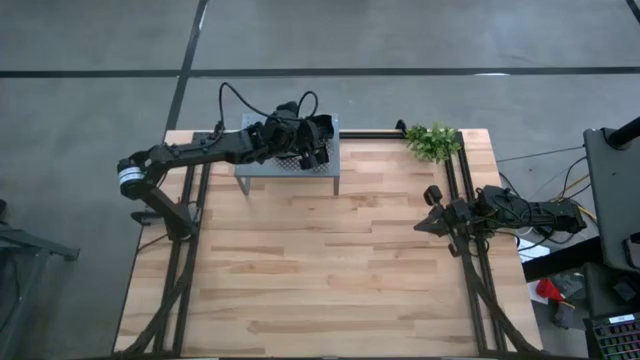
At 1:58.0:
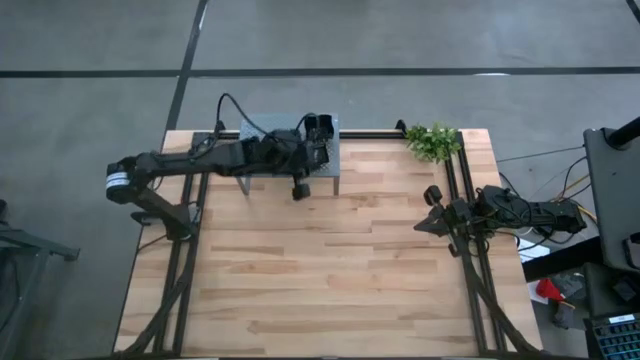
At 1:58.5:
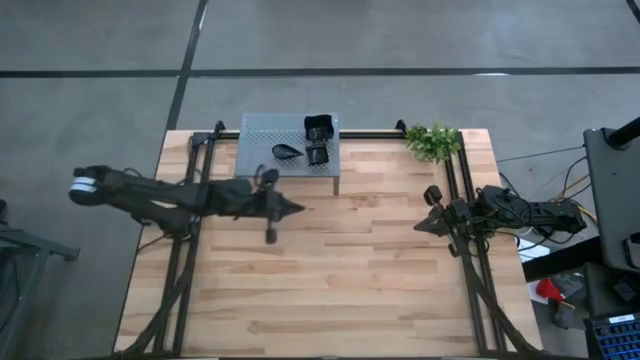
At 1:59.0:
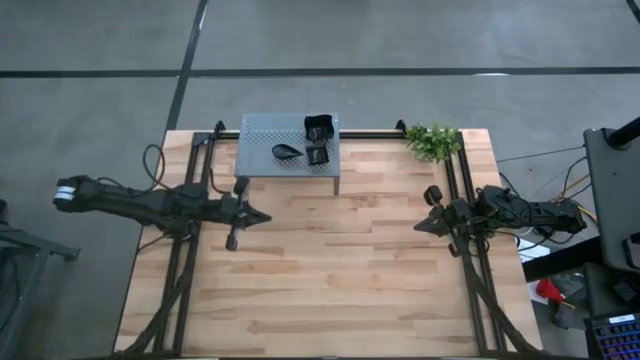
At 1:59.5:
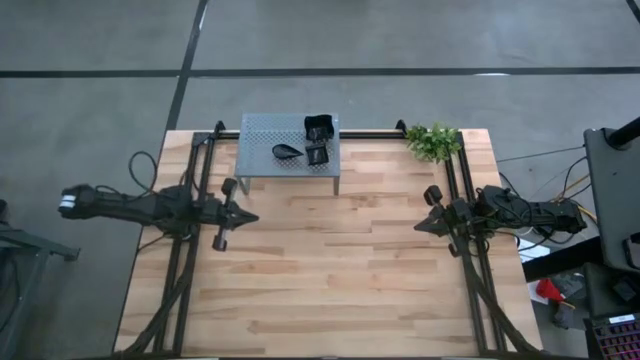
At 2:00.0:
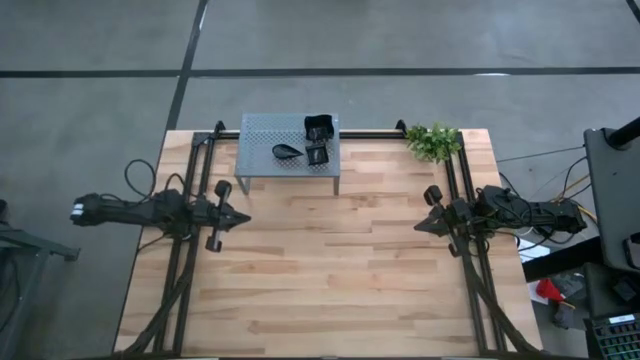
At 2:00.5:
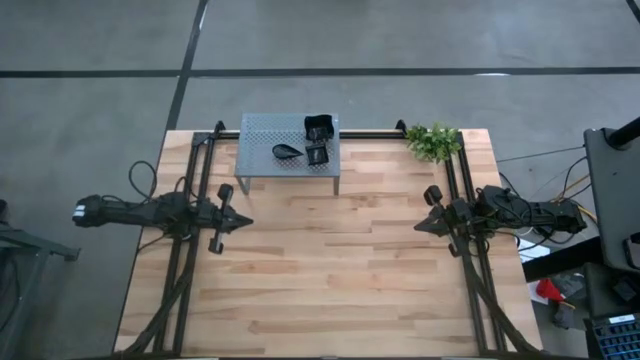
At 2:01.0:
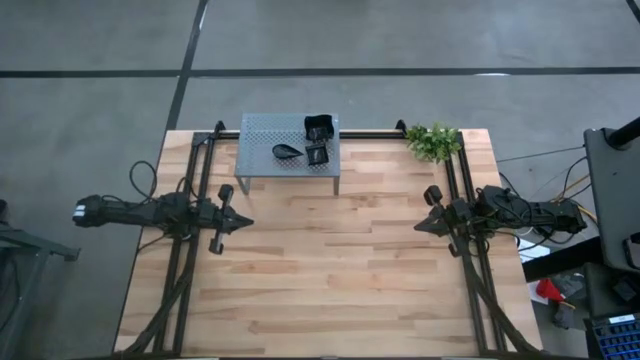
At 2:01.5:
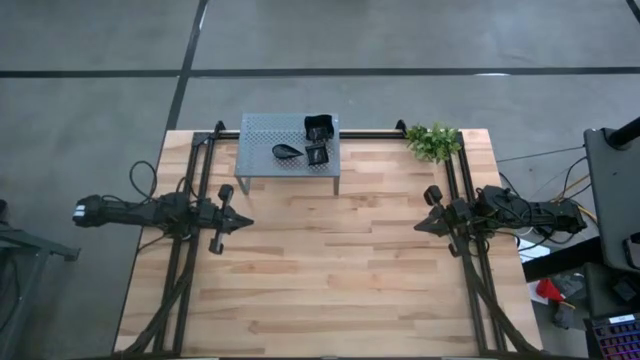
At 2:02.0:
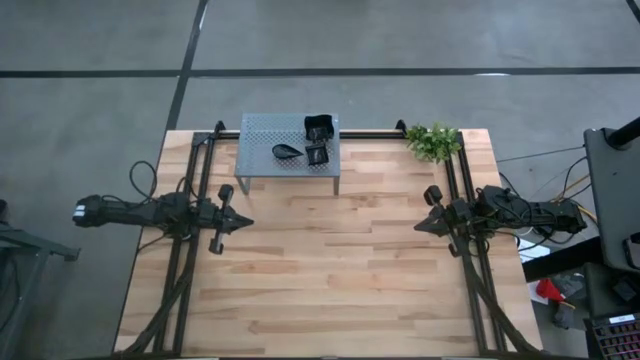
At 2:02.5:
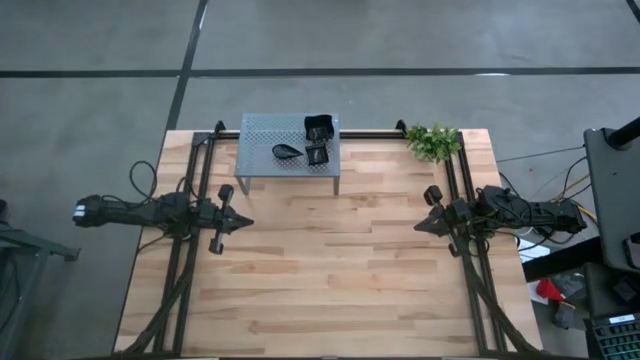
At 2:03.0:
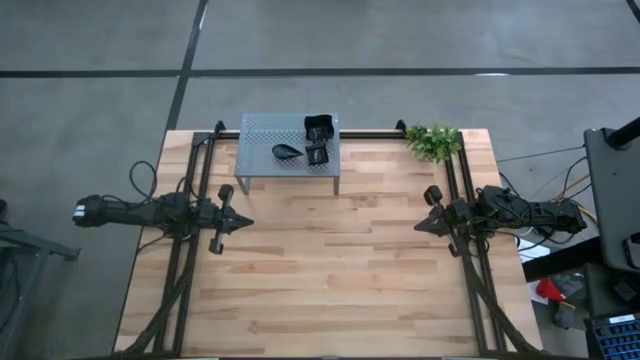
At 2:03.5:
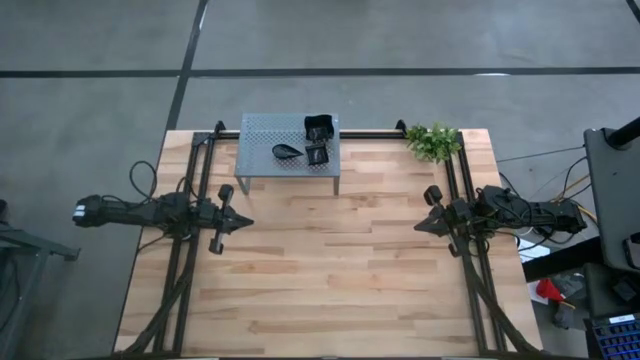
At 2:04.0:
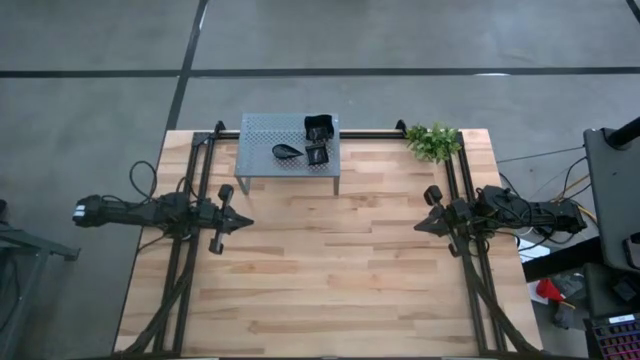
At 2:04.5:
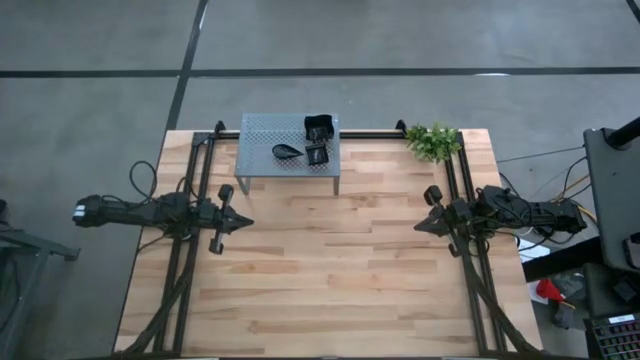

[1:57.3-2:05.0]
Task: Pick & Place Mini shaped plates
Return to Home Position

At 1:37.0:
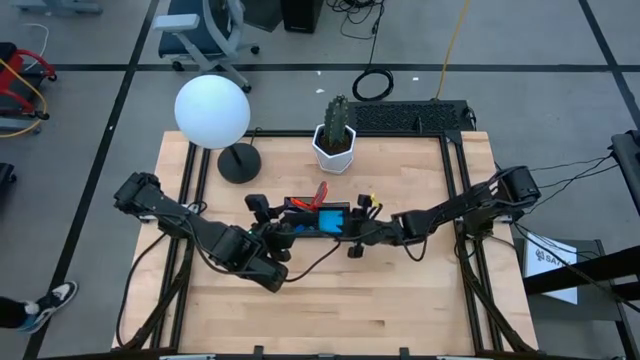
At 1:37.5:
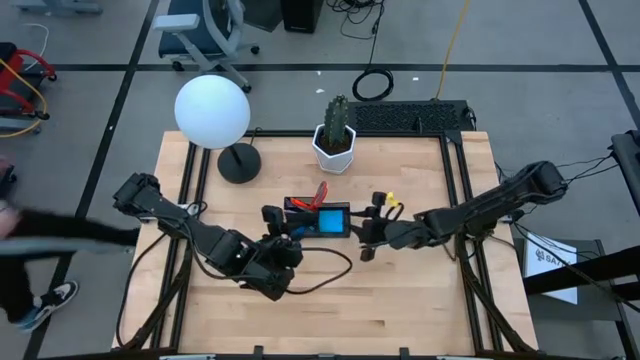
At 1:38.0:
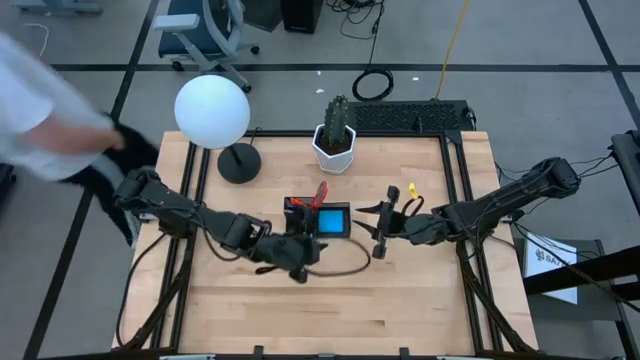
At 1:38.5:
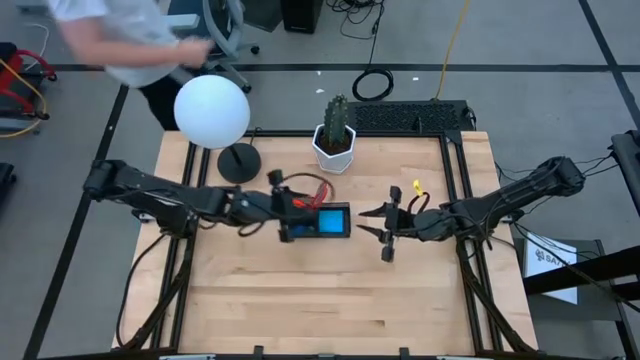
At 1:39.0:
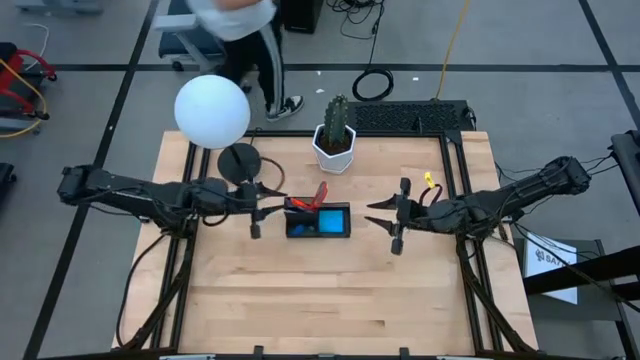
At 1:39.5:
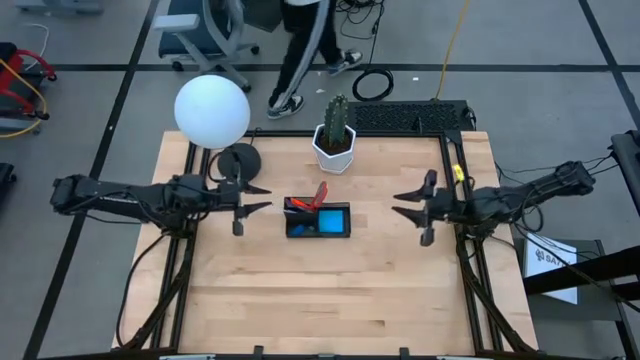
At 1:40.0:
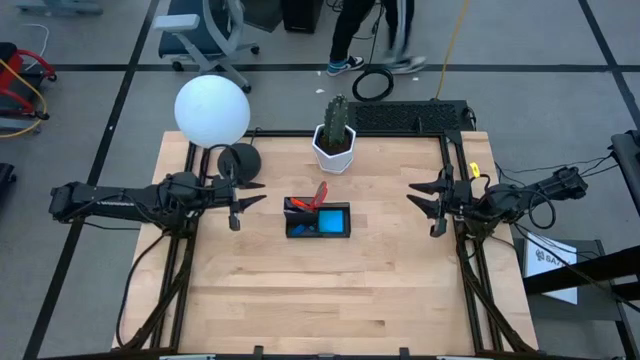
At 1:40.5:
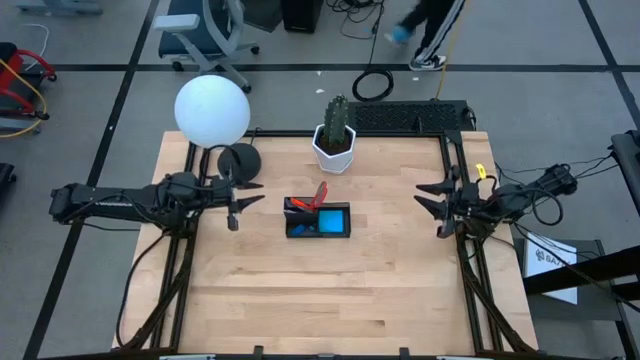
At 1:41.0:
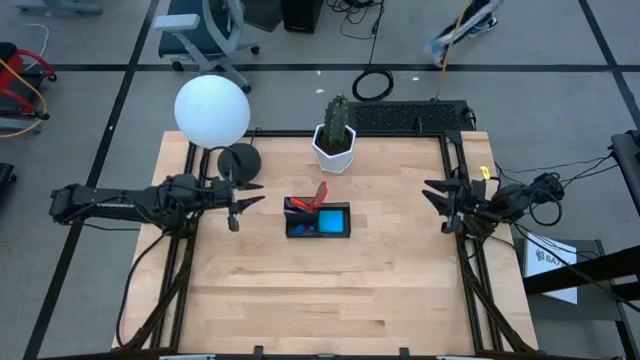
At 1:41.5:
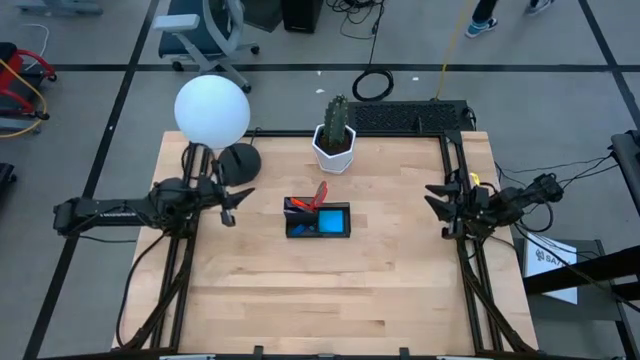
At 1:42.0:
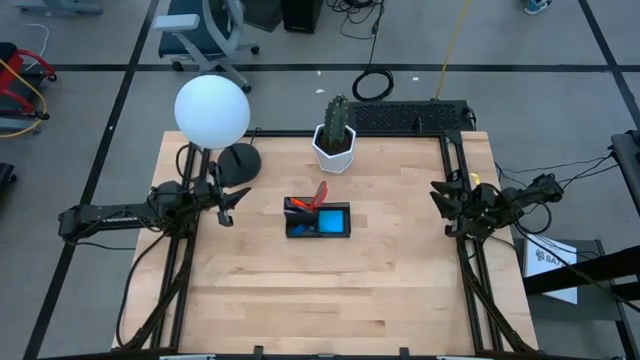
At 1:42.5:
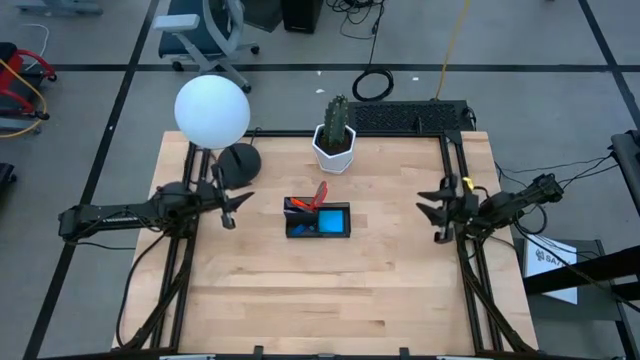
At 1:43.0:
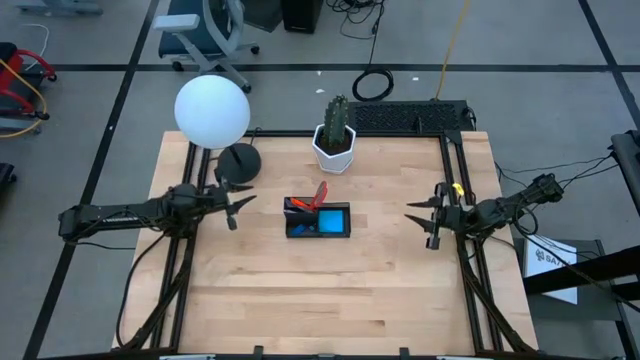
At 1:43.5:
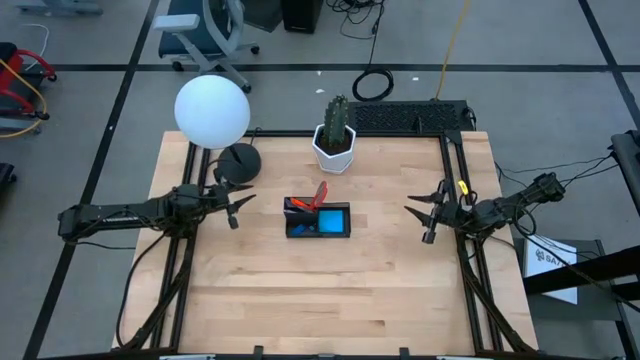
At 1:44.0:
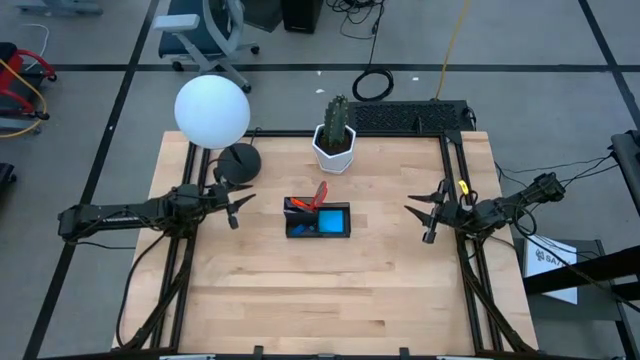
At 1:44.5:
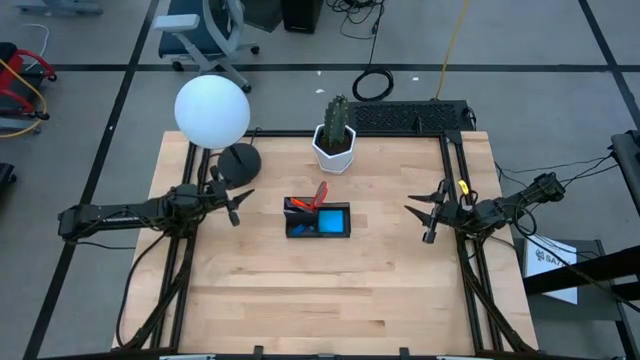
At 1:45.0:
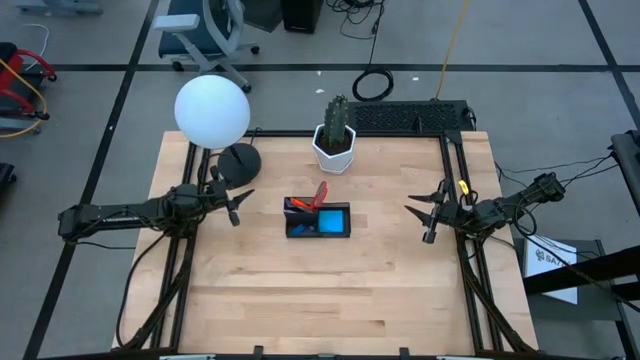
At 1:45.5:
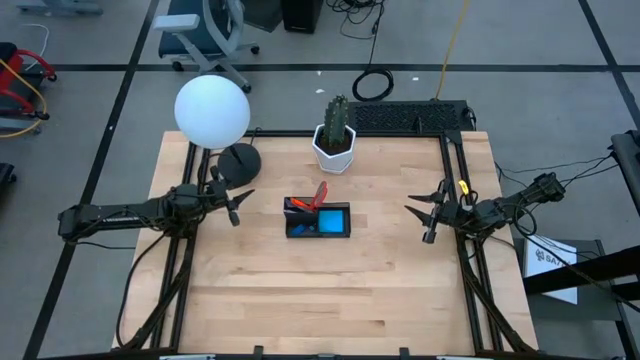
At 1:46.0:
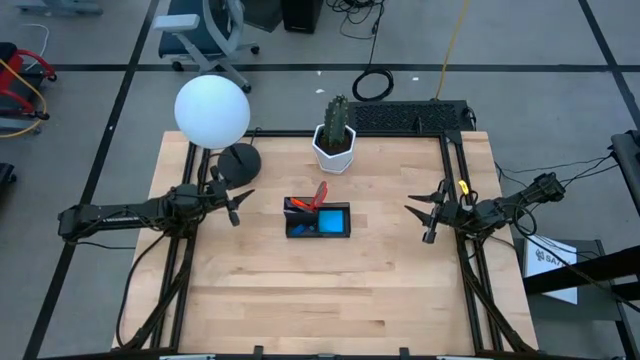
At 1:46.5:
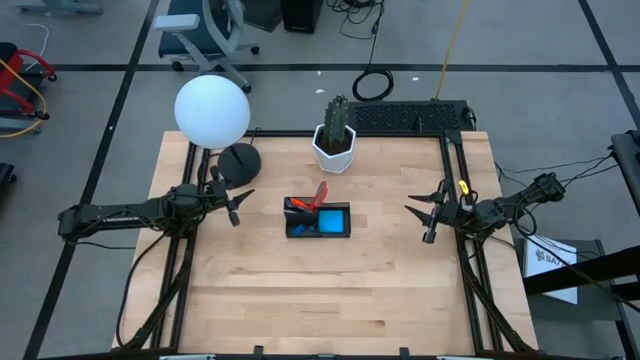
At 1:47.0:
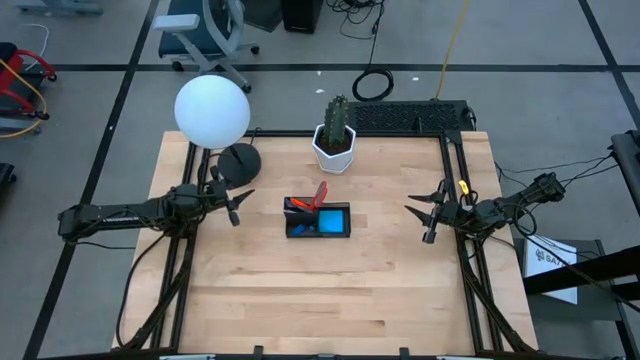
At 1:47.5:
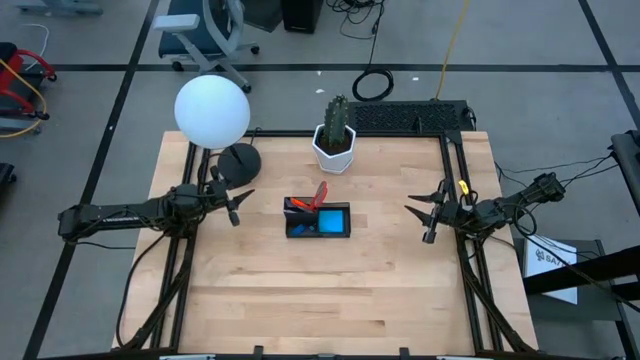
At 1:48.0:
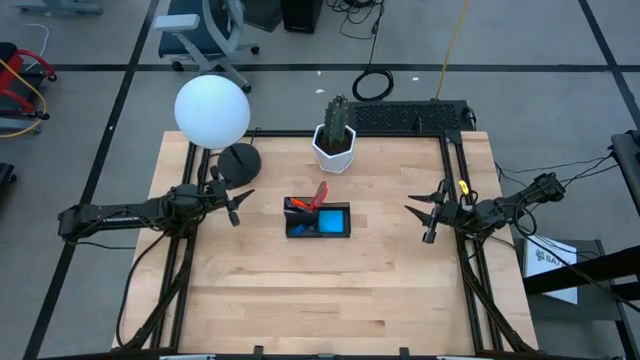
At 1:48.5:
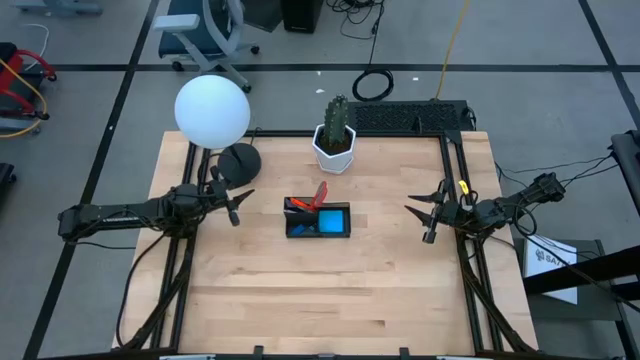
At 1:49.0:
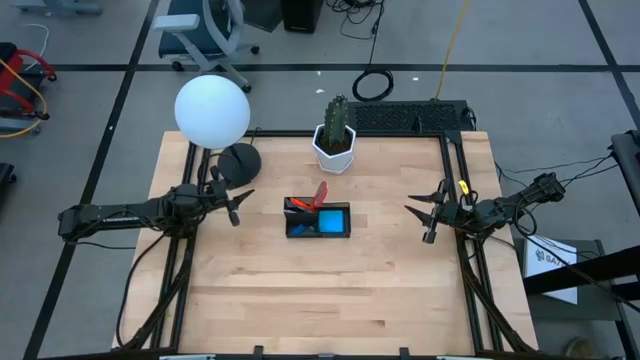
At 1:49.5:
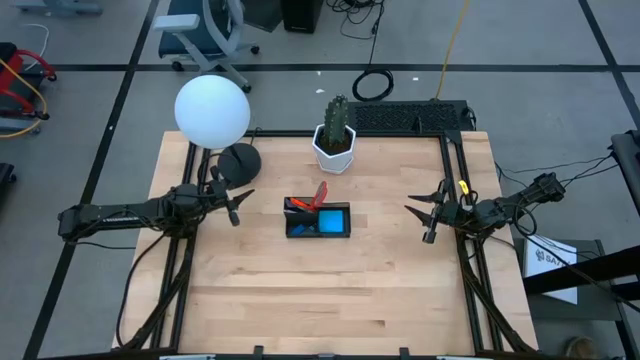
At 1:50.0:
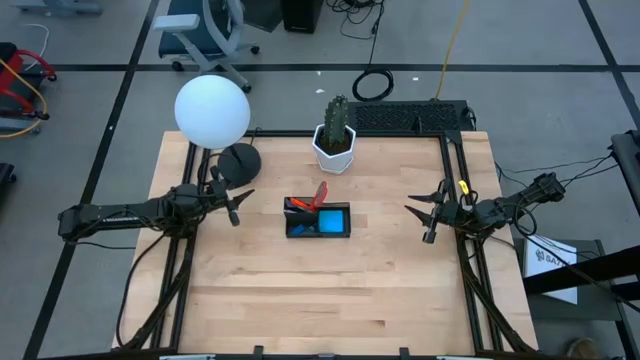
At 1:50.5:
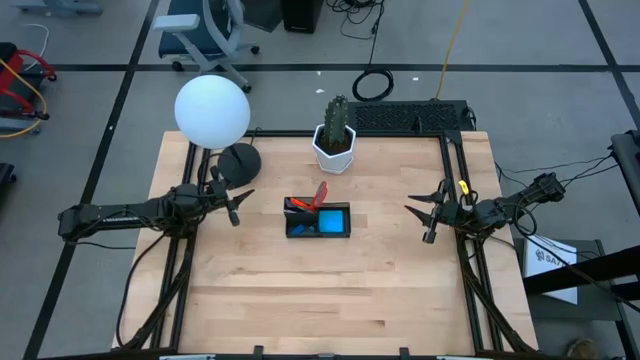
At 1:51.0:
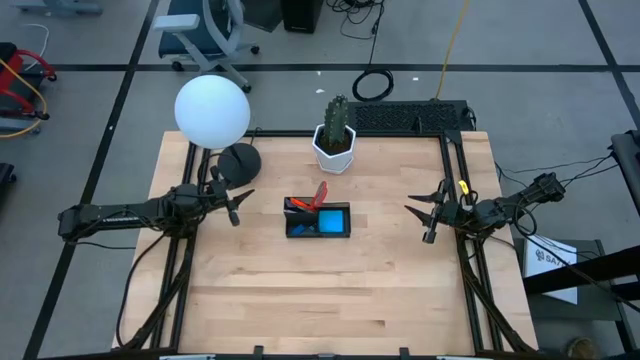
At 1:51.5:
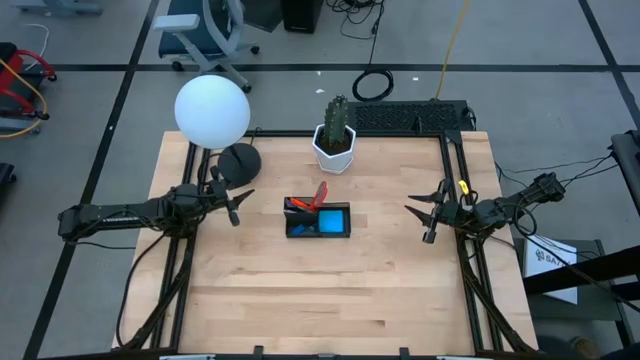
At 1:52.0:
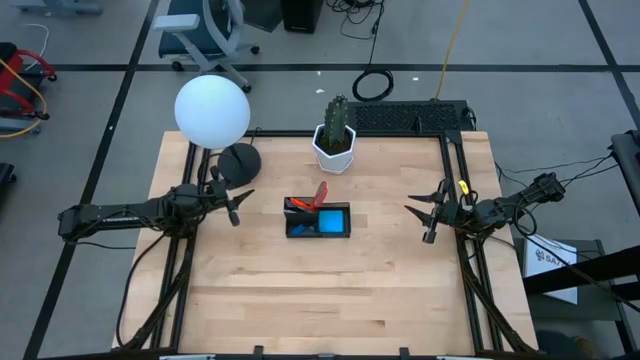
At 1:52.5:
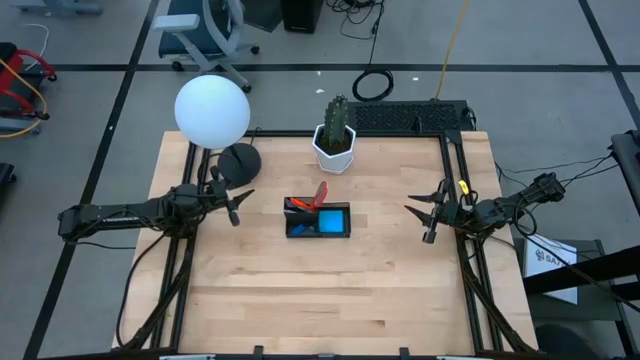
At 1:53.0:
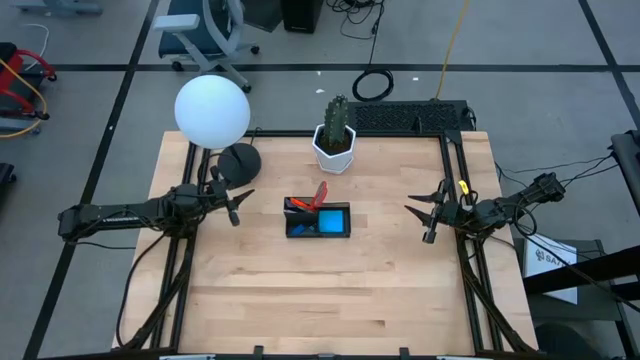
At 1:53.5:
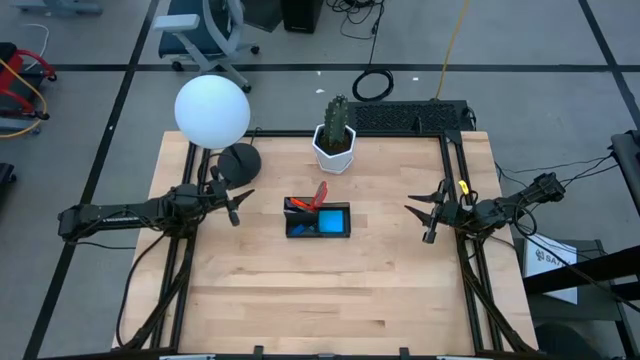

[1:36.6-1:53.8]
Task: Pick and place office supplies into organizer
Return to Home Position
